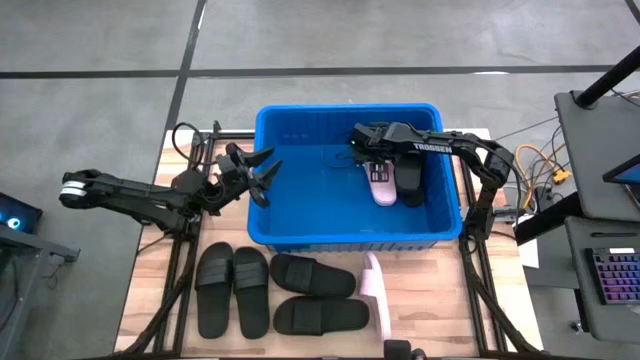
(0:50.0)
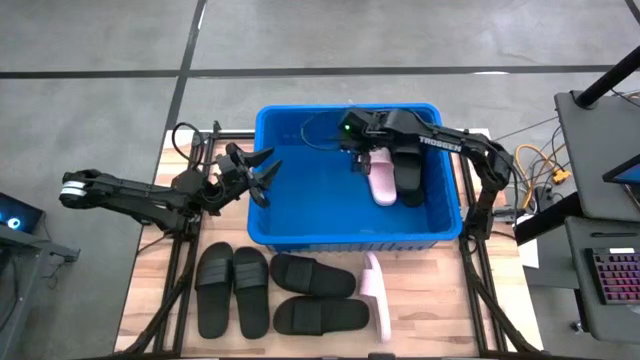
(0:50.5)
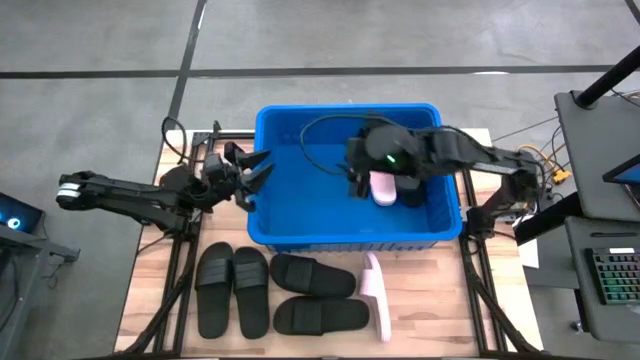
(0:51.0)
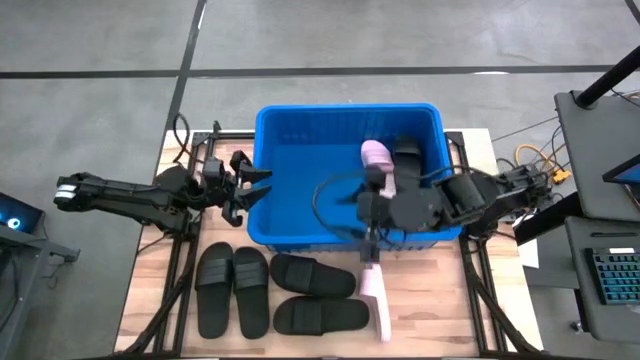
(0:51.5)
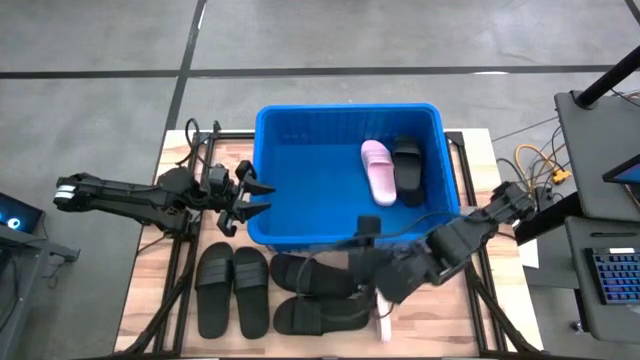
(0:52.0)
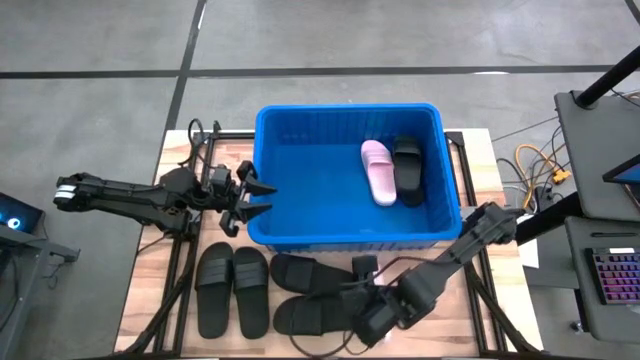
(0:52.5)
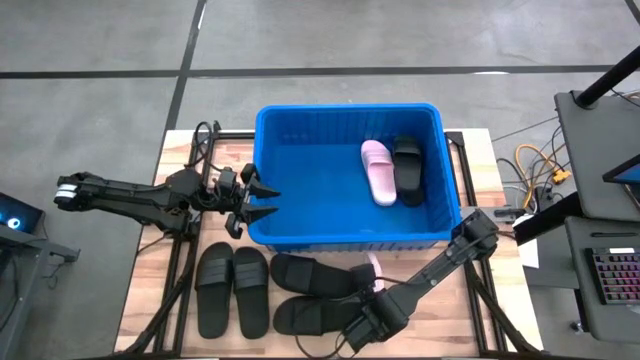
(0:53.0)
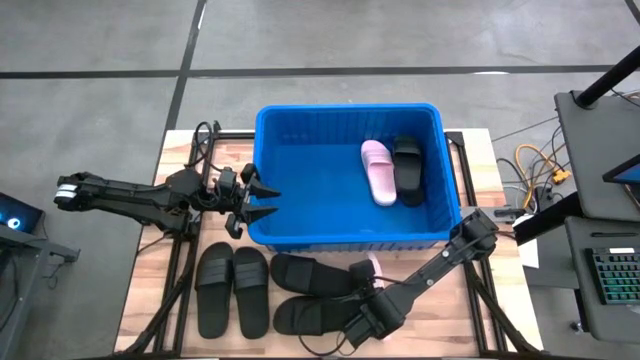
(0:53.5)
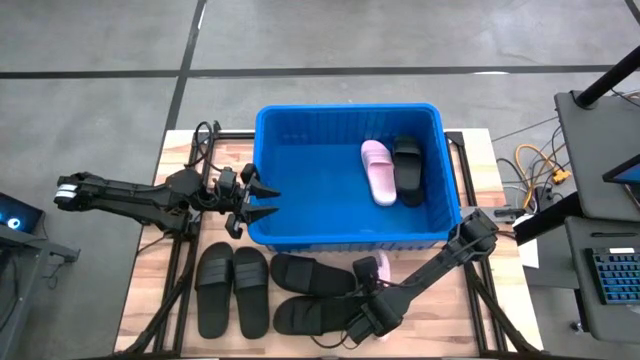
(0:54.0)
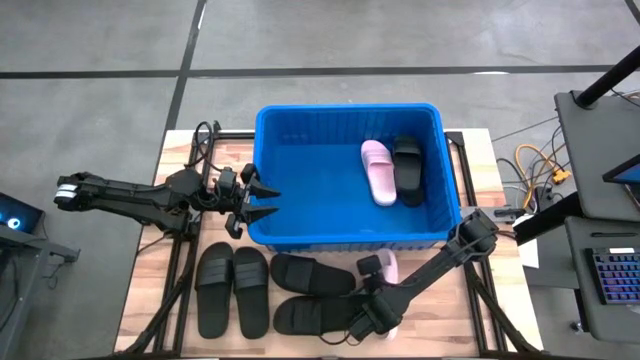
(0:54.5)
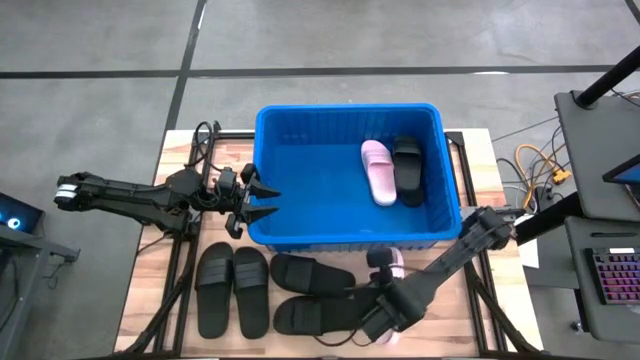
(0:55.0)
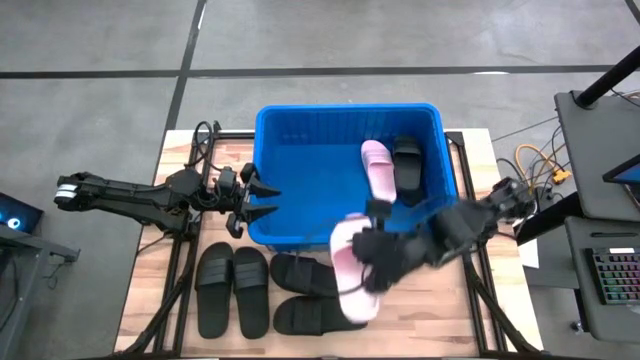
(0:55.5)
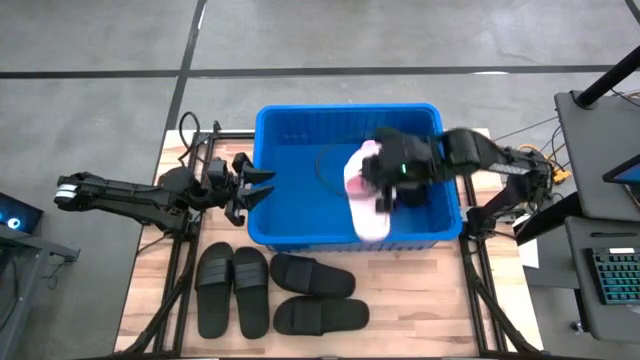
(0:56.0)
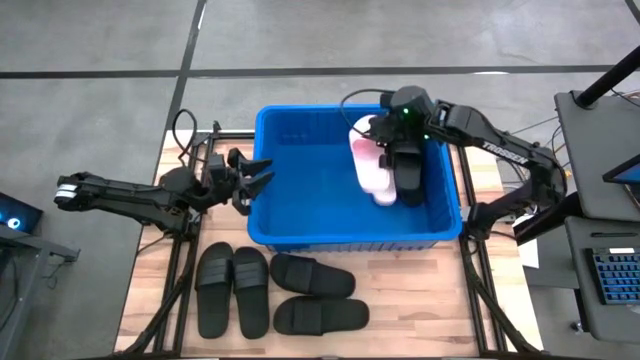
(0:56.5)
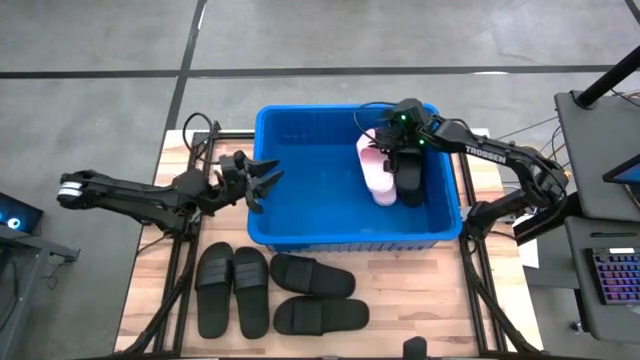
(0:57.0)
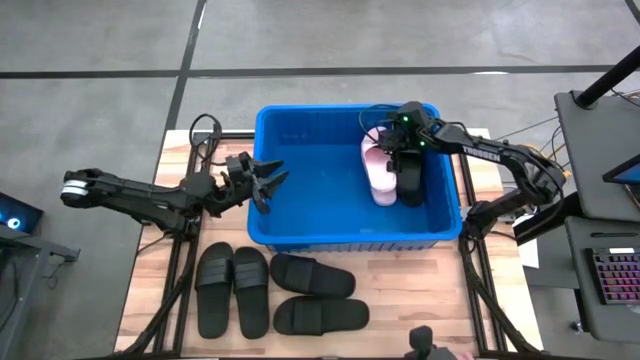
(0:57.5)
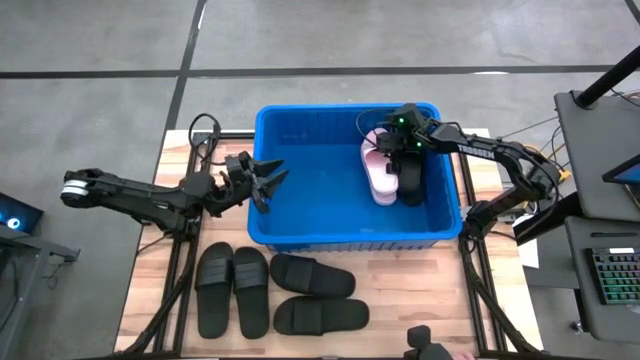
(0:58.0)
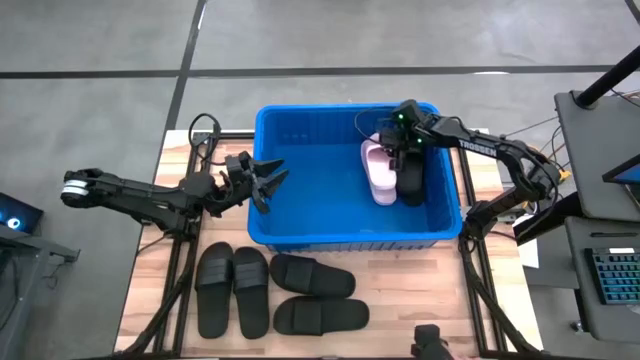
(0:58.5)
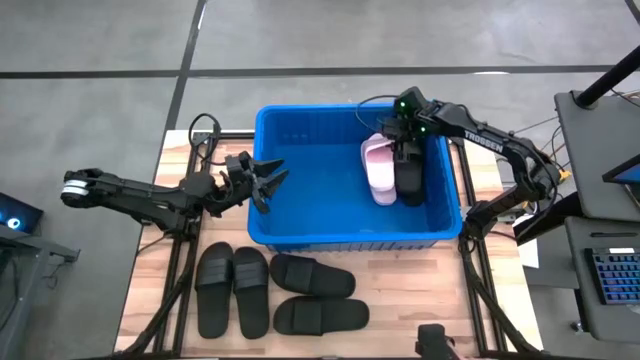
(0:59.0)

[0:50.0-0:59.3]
Task: Pick and place slides into bin
Put the pink slide into the blue container

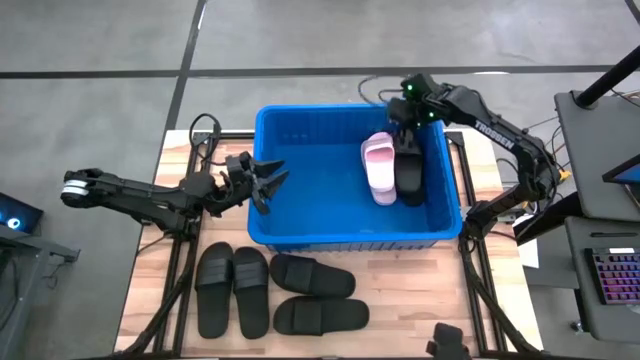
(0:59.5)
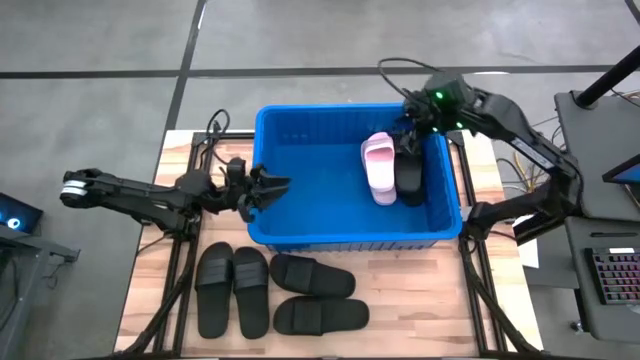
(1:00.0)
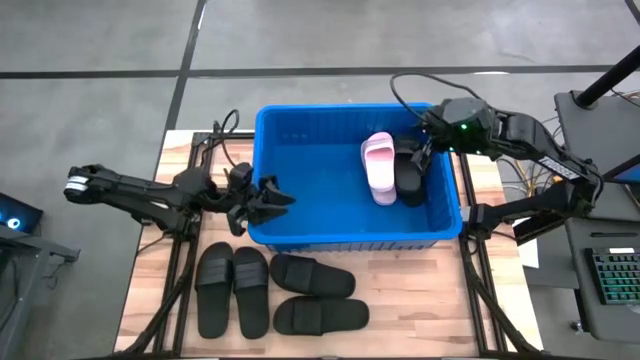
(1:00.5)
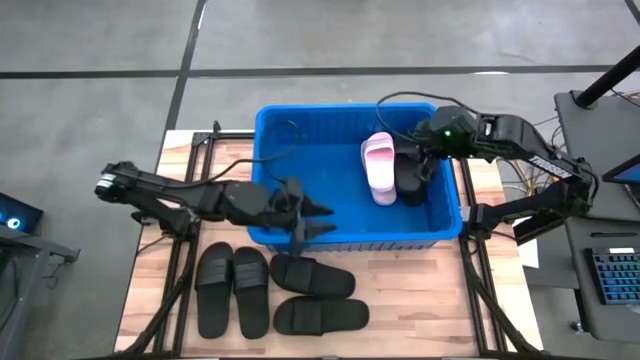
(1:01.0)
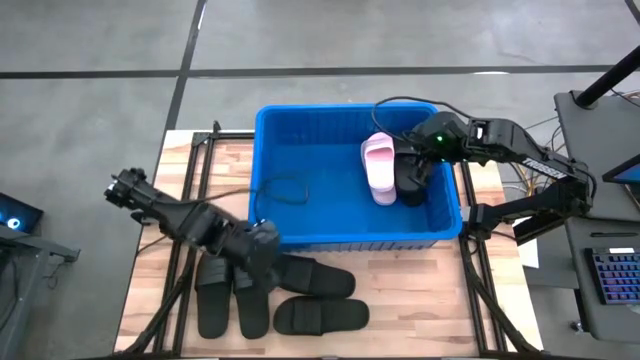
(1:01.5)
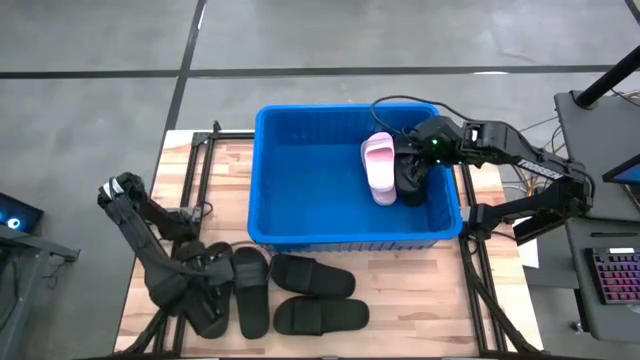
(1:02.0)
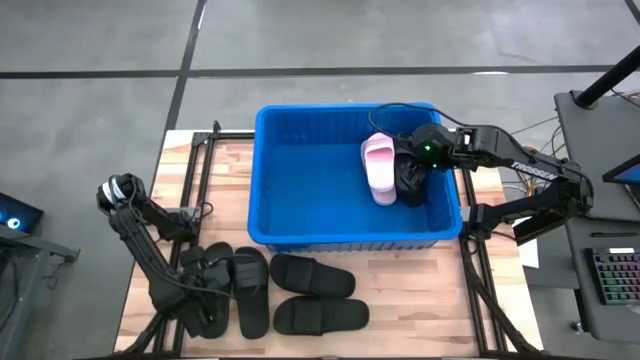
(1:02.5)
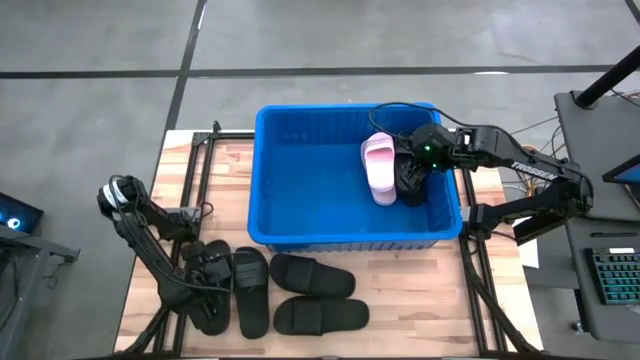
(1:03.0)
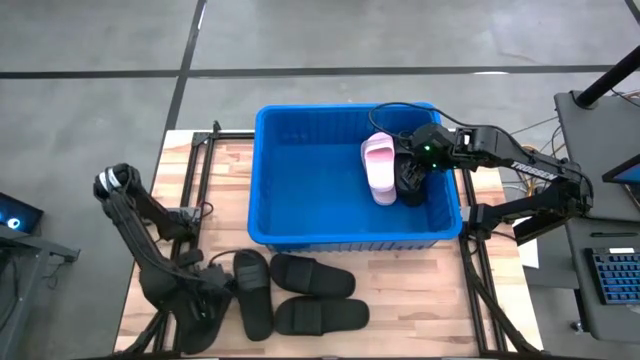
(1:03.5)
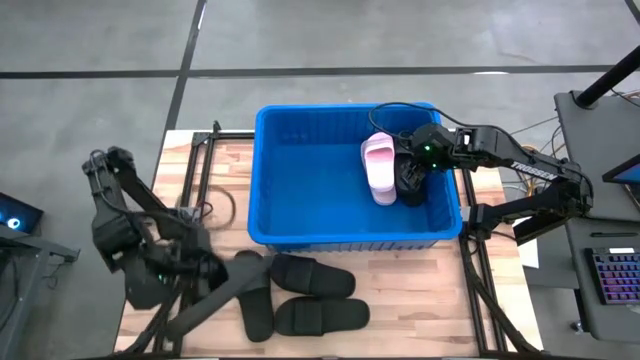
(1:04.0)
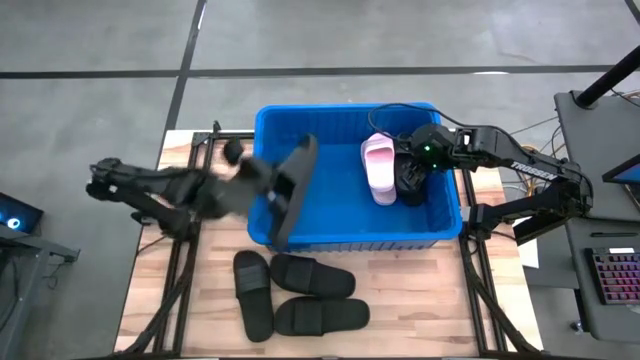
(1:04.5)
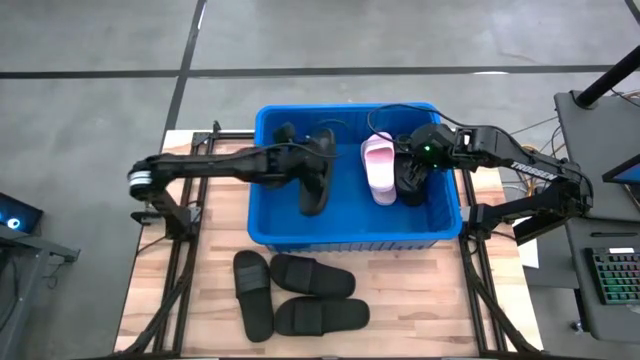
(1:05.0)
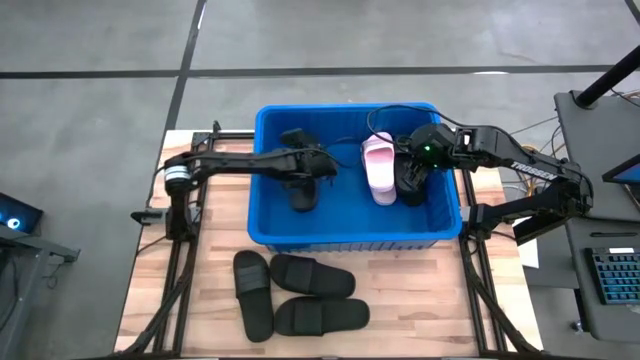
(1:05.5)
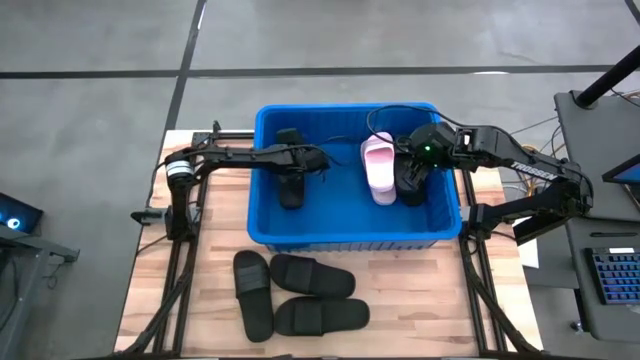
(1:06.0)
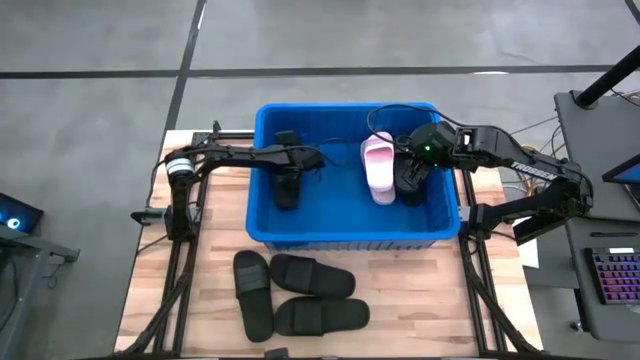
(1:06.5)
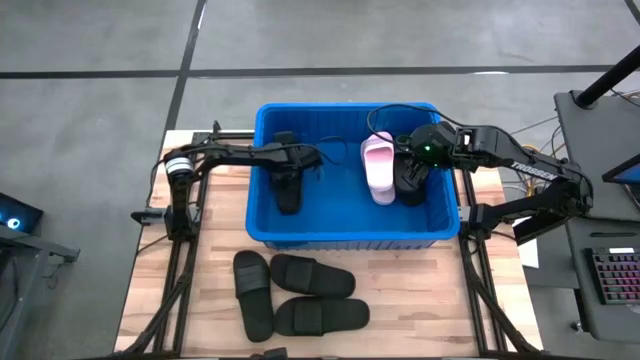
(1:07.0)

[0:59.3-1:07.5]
Put the black slide into the blue container

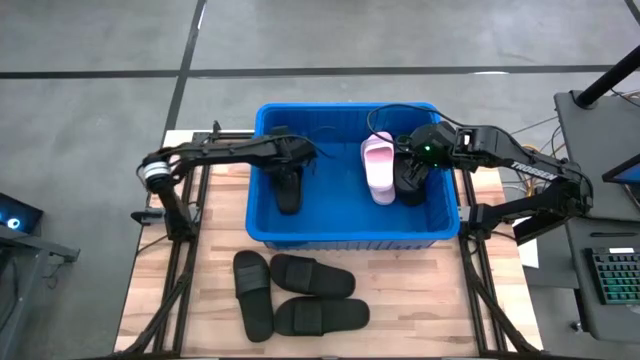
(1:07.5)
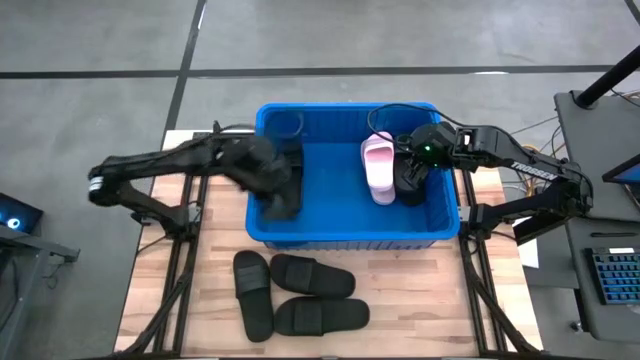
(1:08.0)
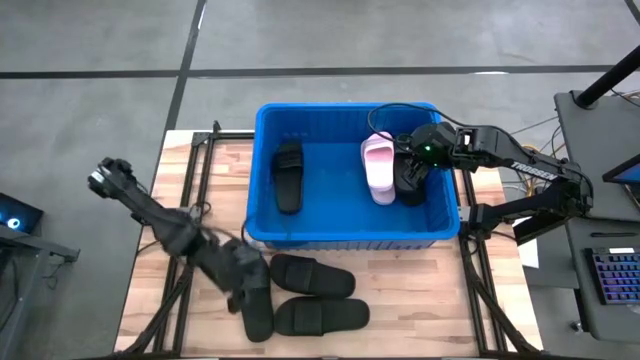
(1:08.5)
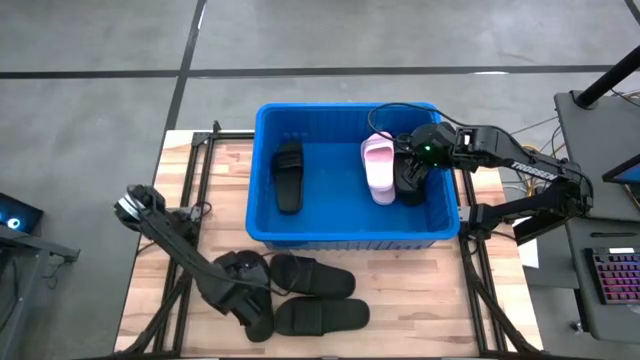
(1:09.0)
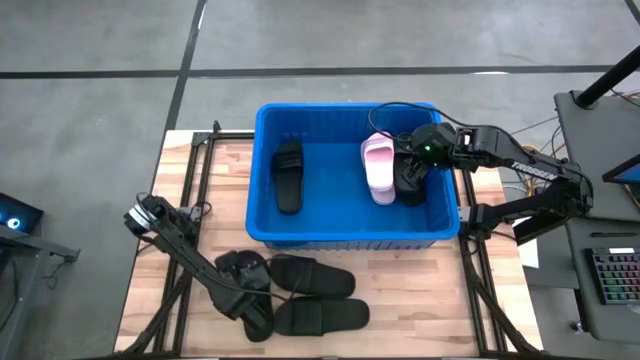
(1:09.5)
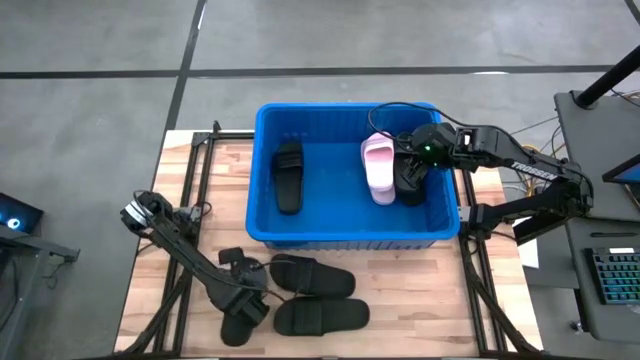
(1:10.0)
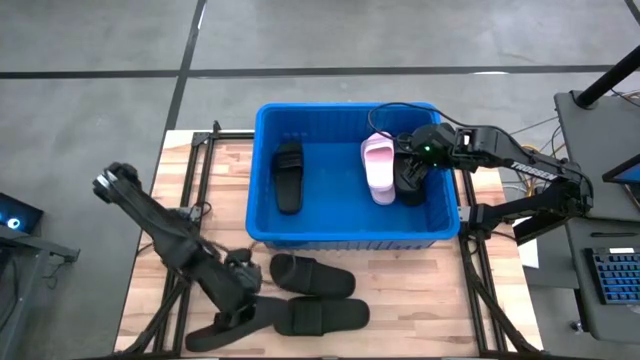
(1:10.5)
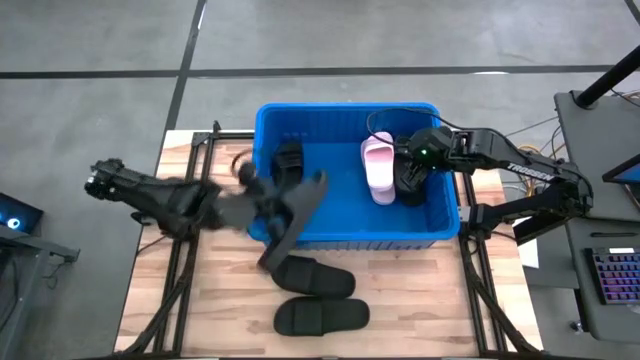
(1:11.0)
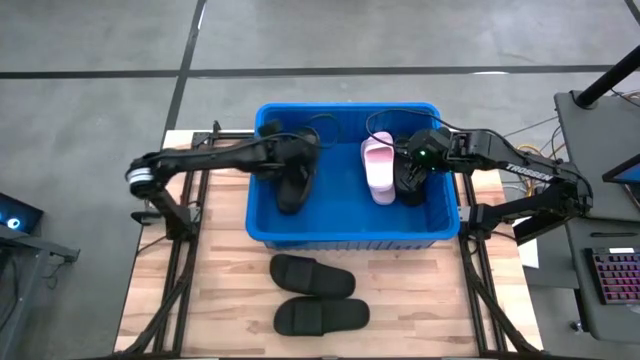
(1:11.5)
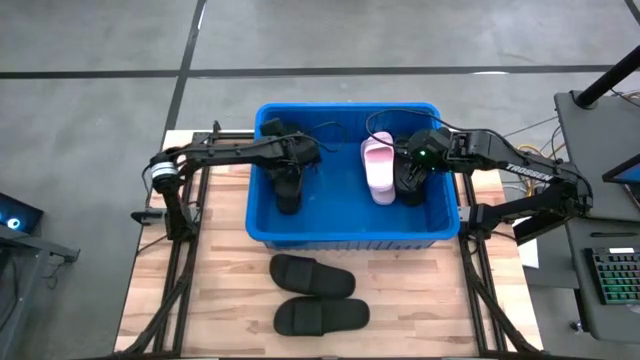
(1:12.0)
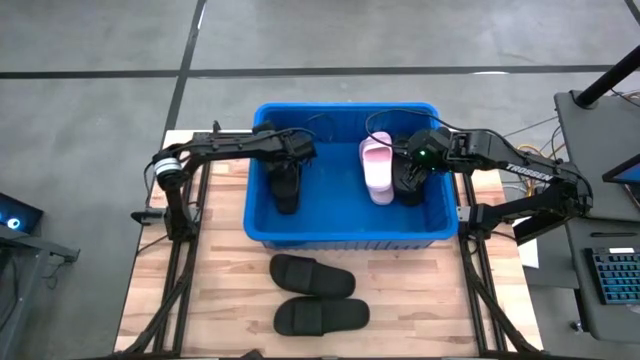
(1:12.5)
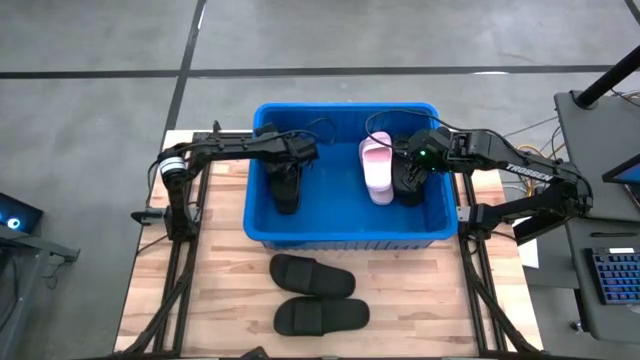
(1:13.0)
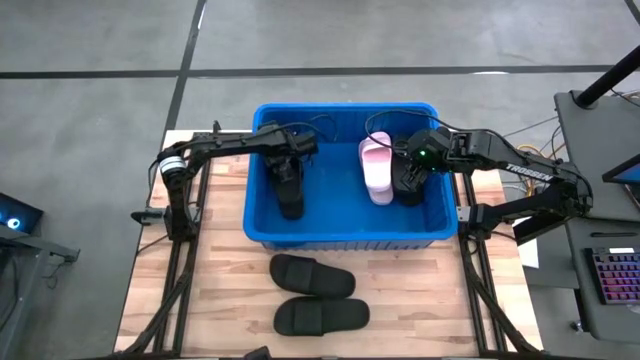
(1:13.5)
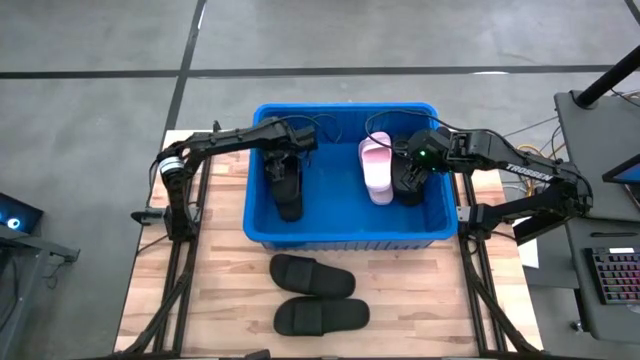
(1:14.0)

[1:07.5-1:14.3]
Put the black slide into the blue container
